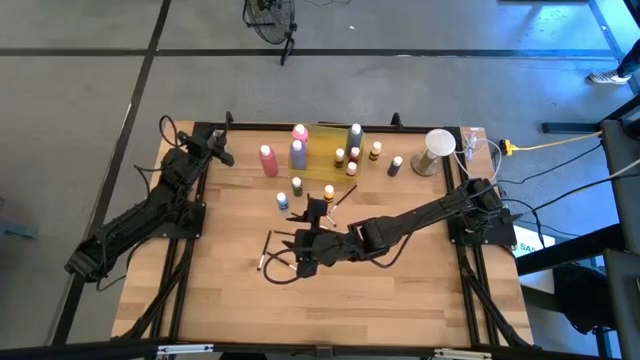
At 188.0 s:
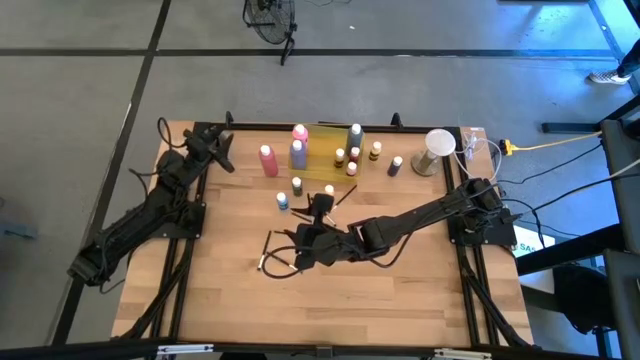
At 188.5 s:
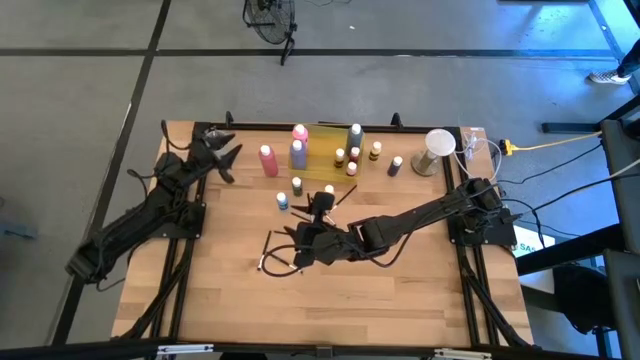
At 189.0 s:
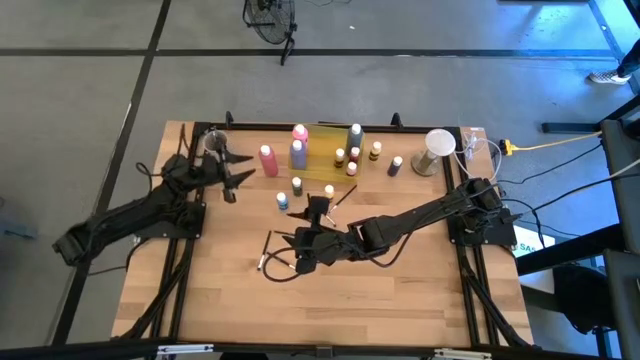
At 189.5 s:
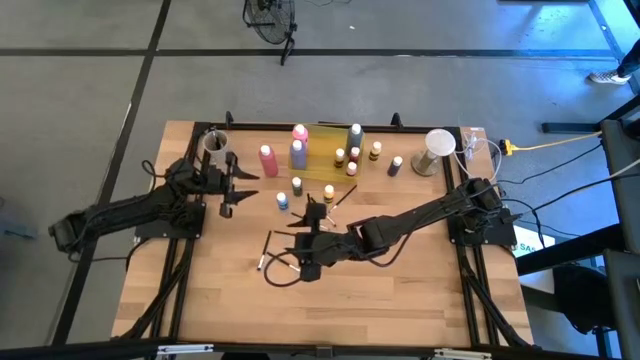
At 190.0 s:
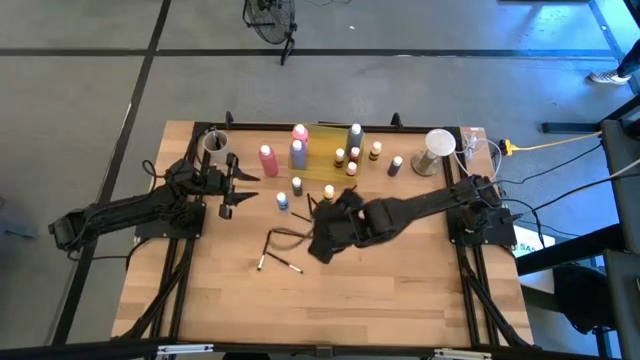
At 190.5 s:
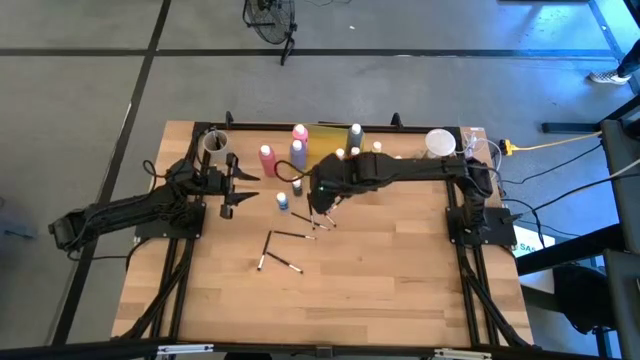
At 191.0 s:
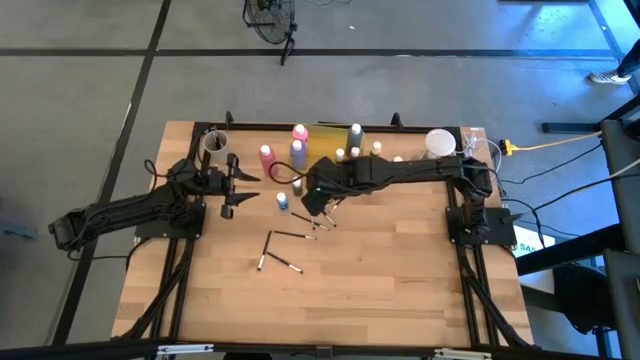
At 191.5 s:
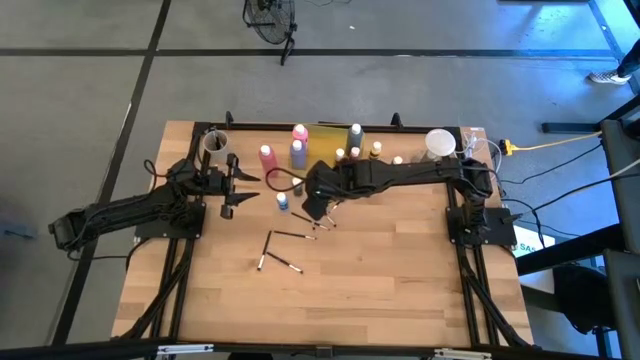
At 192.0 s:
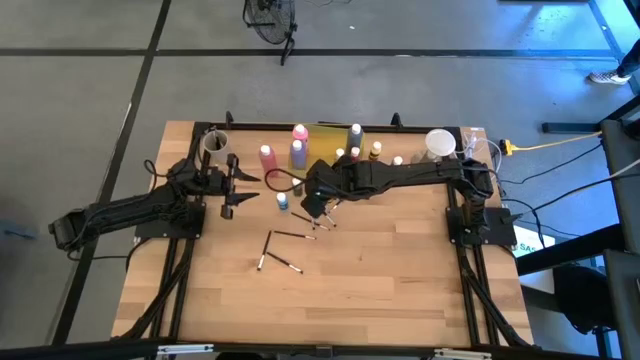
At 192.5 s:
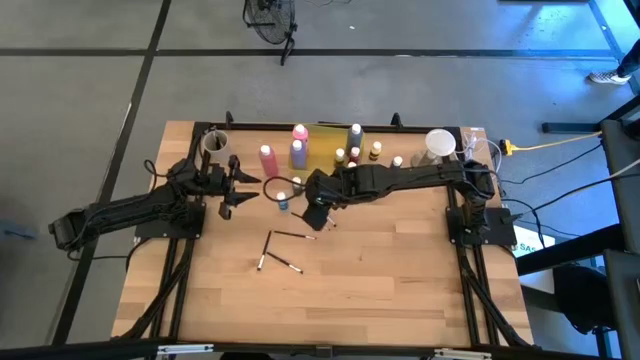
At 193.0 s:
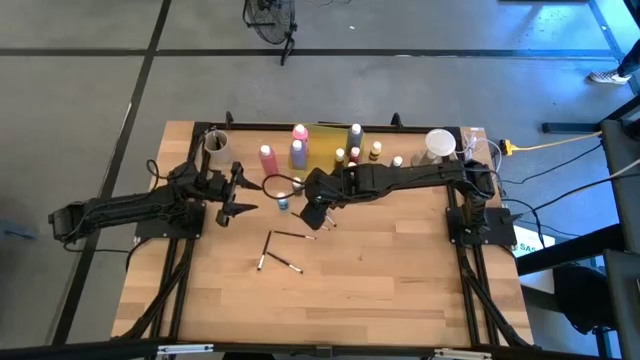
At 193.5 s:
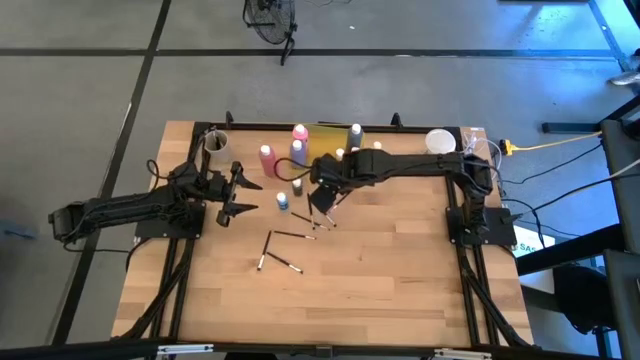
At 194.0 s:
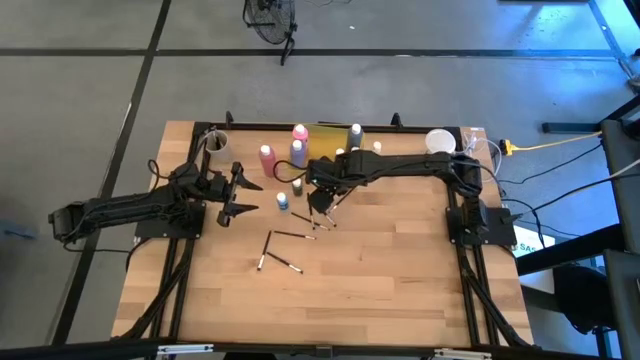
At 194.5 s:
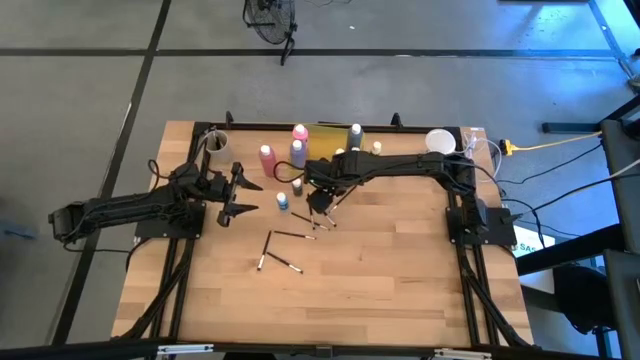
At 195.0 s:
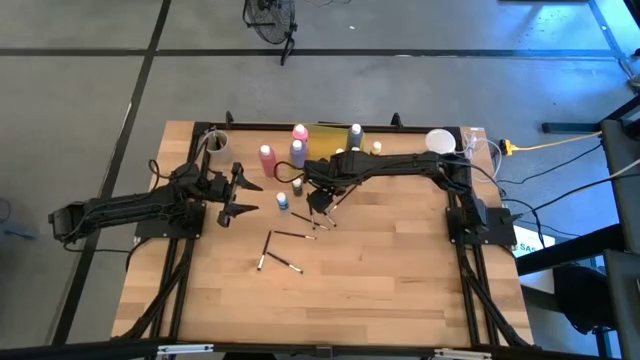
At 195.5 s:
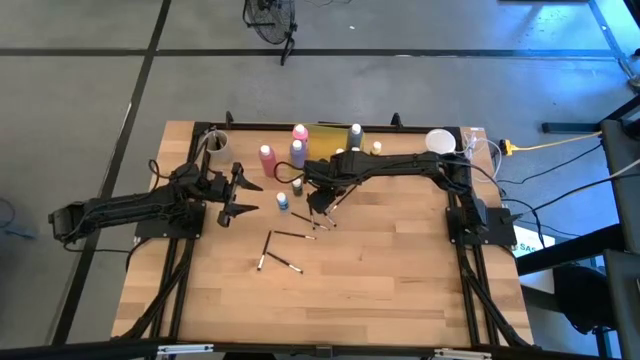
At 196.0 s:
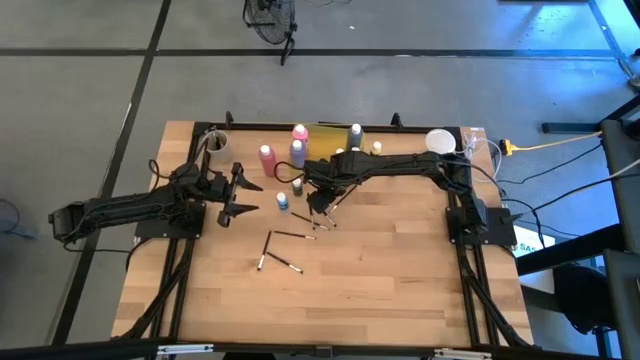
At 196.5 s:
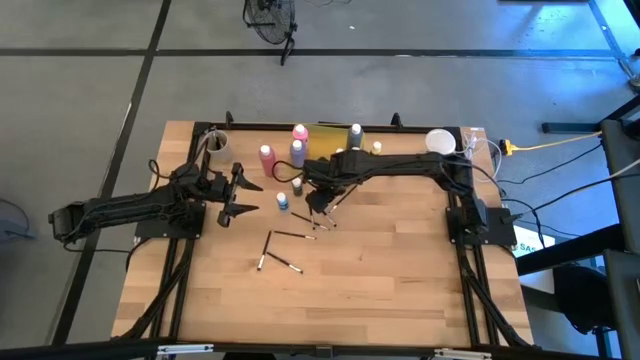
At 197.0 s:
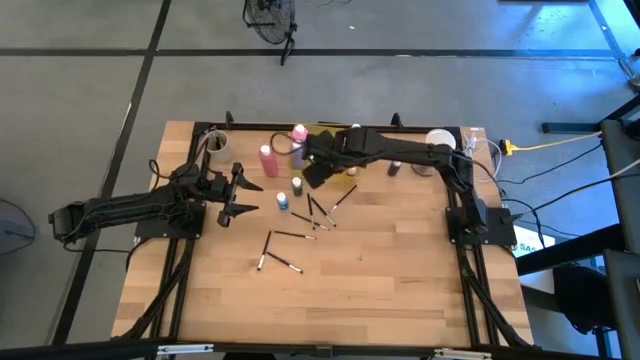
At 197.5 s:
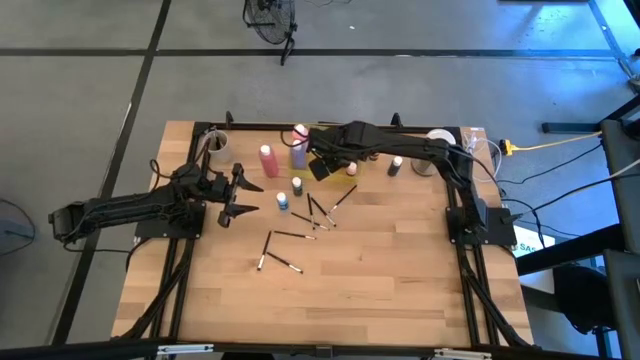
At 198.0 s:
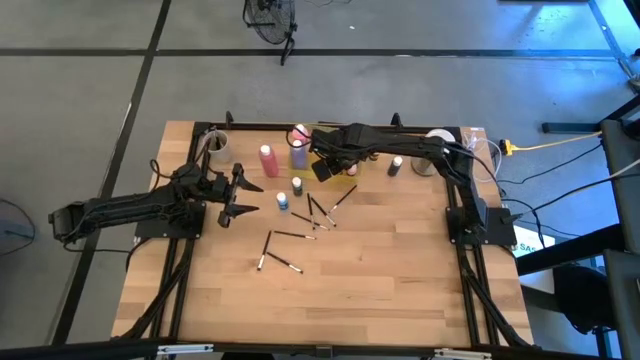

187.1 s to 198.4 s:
Task: Pick & Place Paint Supplies
Put the small yellow paint bottle into the yellow bin

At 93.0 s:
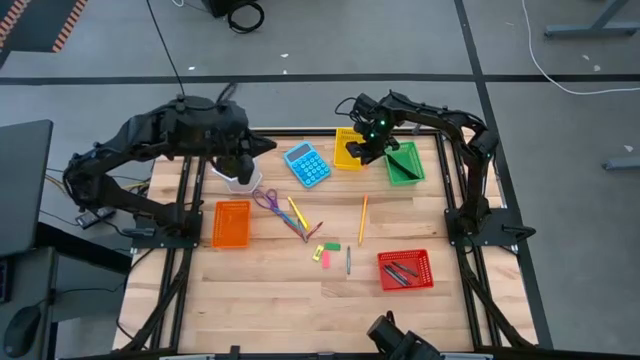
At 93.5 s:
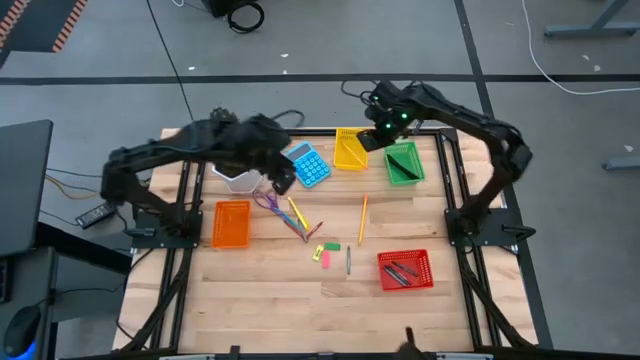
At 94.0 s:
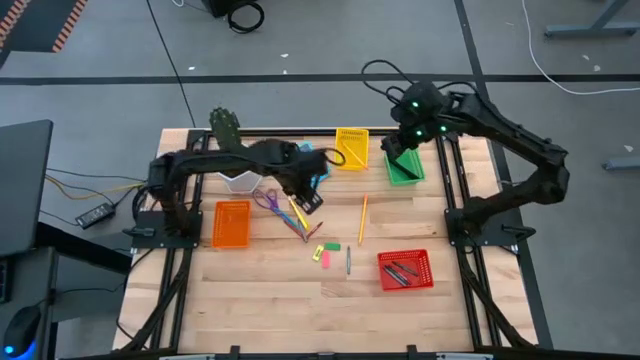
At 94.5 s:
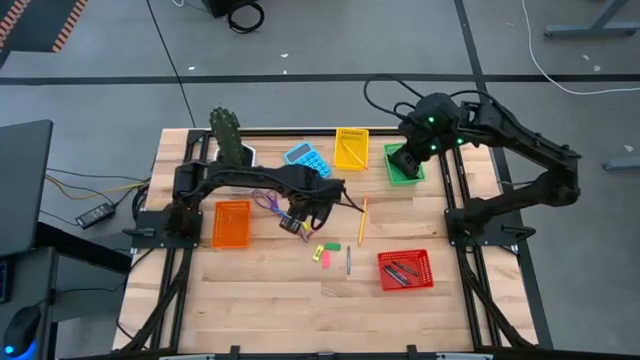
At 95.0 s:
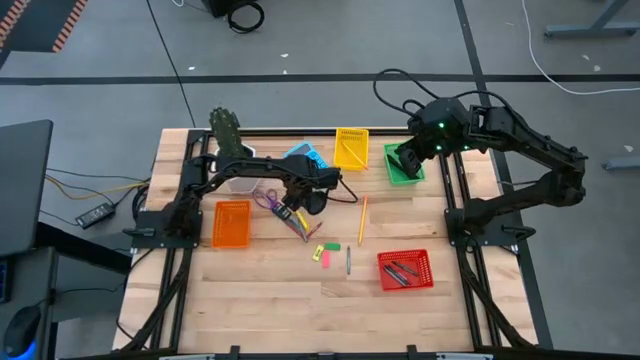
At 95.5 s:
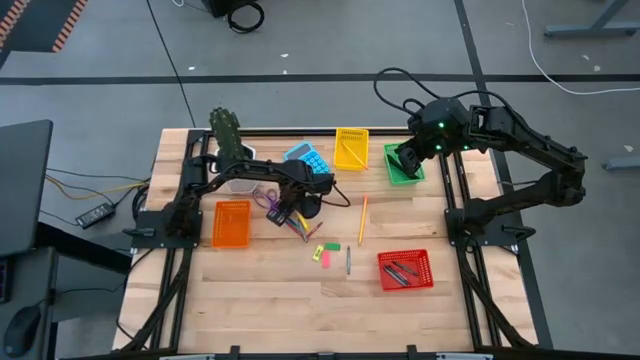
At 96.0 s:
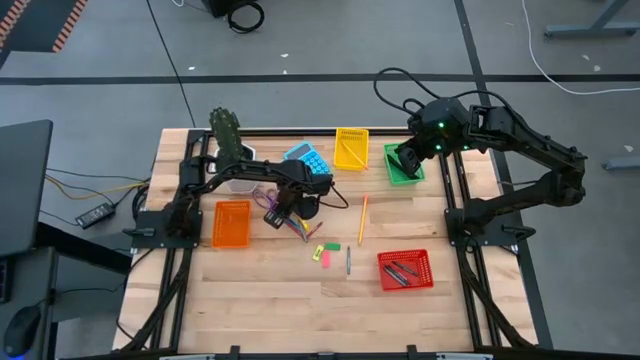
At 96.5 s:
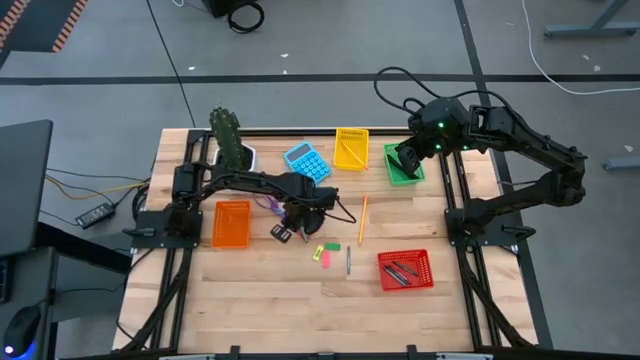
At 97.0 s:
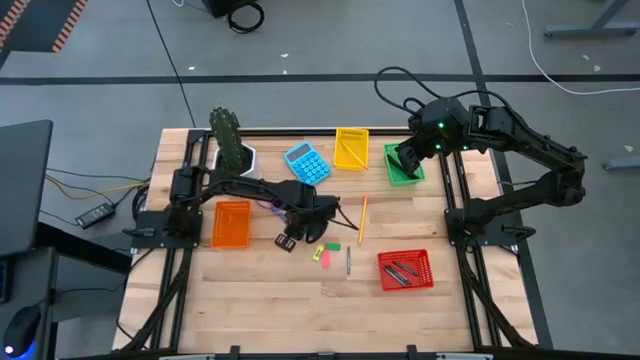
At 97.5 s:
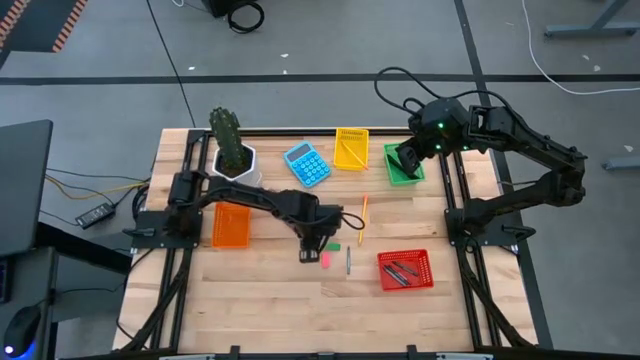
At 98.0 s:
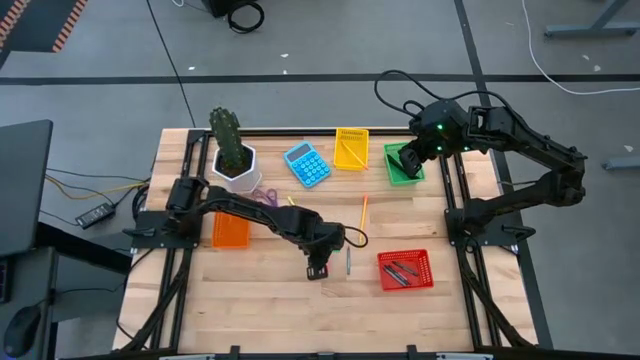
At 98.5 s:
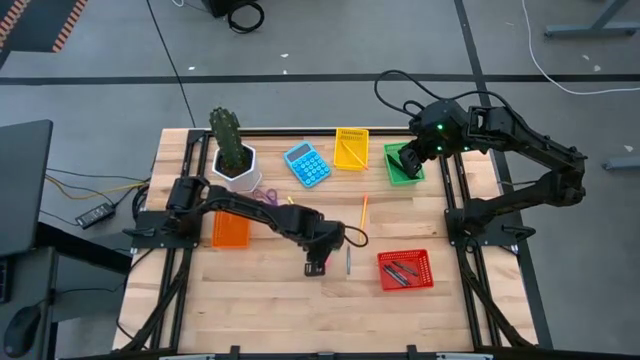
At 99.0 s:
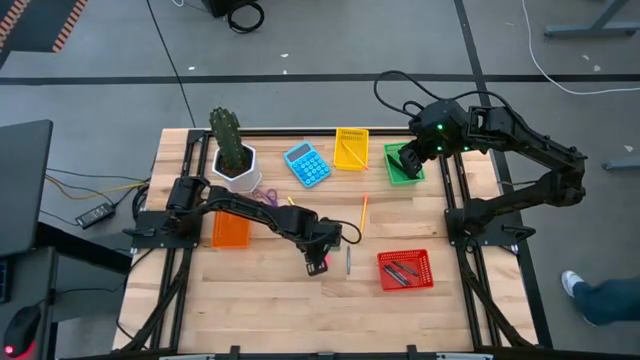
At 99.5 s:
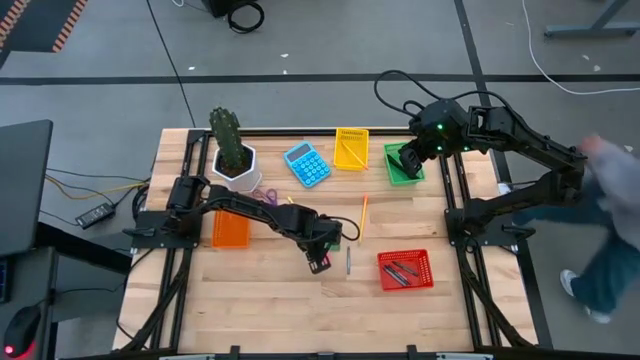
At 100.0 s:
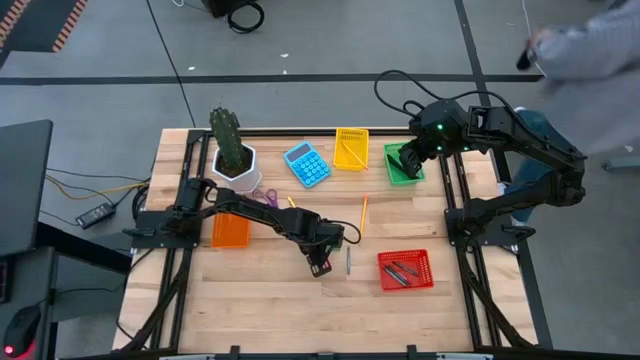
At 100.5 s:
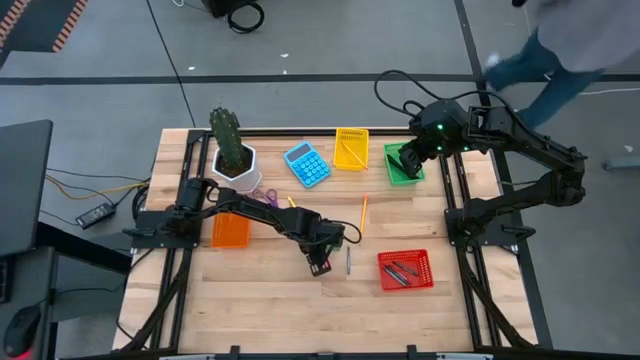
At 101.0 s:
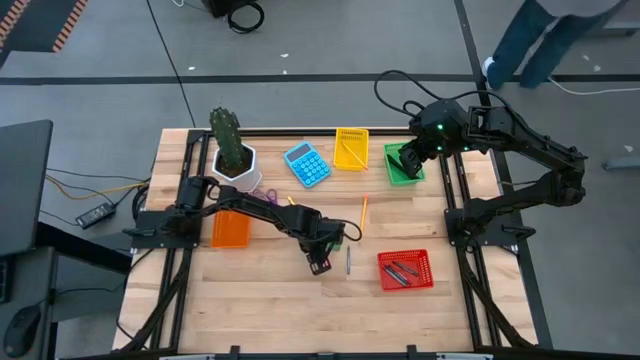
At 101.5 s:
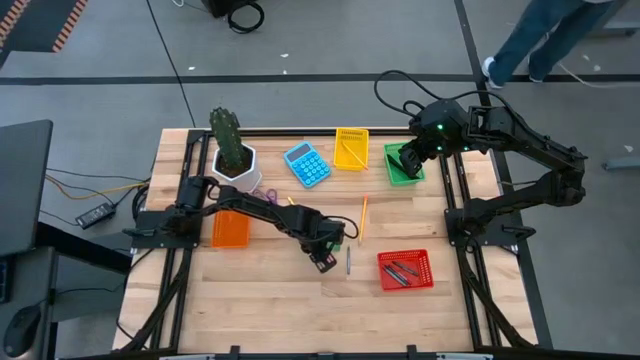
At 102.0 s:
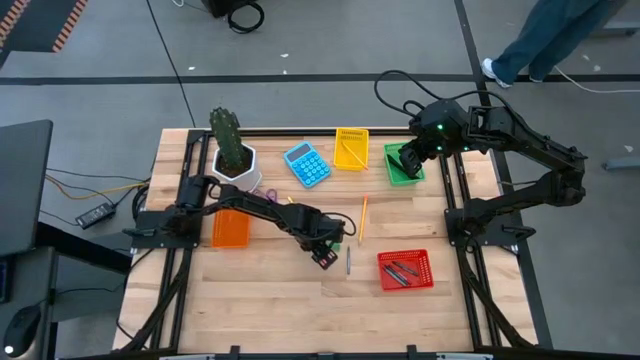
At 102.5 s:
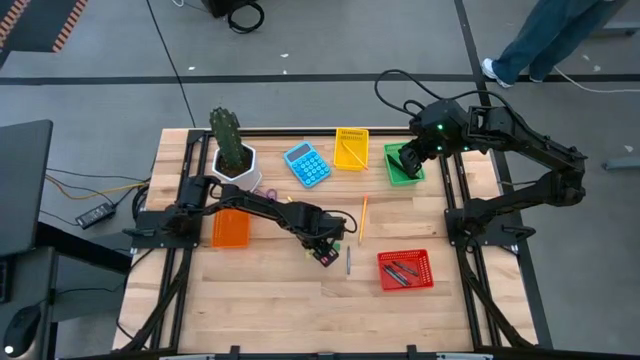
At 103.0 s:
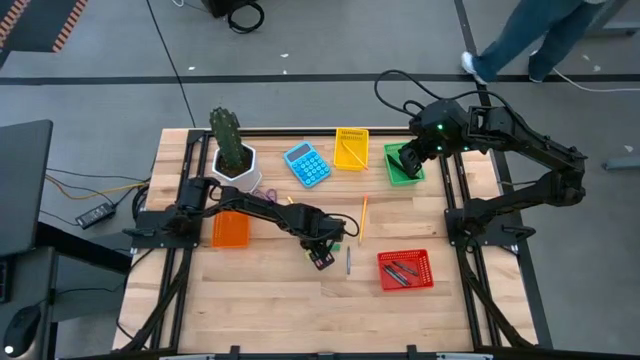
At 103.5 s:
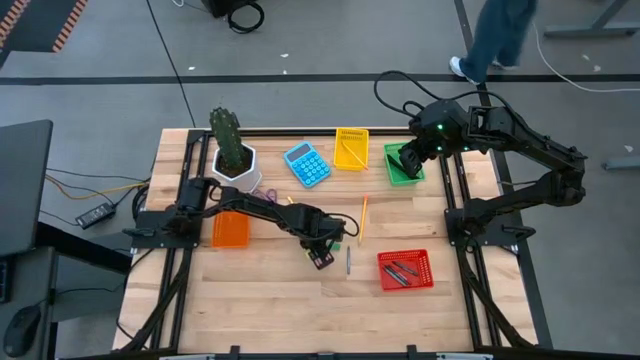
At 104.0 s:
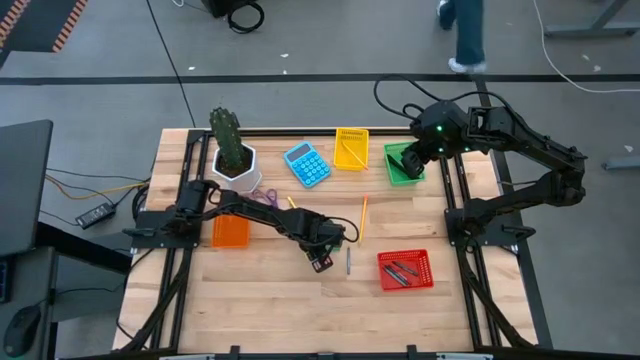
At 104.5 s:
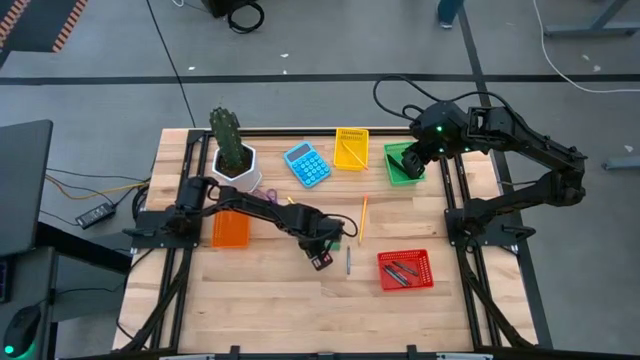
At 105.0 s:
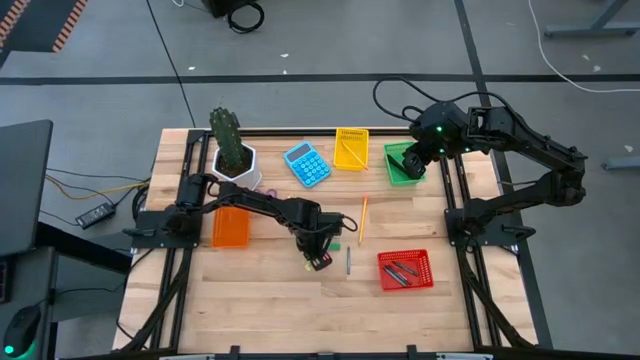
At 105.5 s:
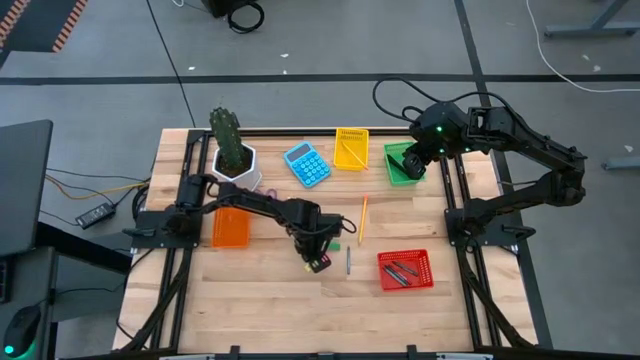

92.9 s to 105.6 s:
Task: Sort crayons/erasers/pens/pencils in bins
Put the yellow eraser into the orange bin
